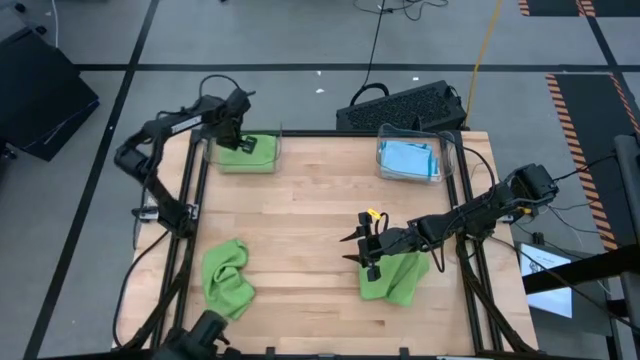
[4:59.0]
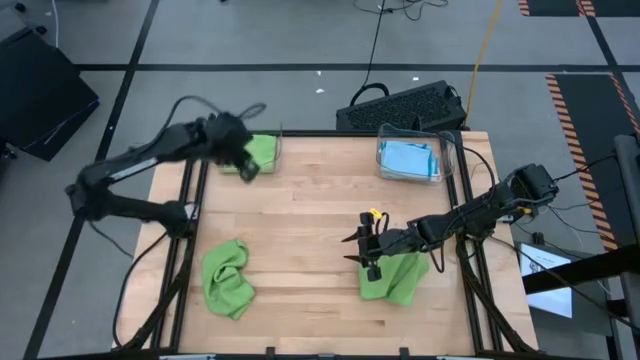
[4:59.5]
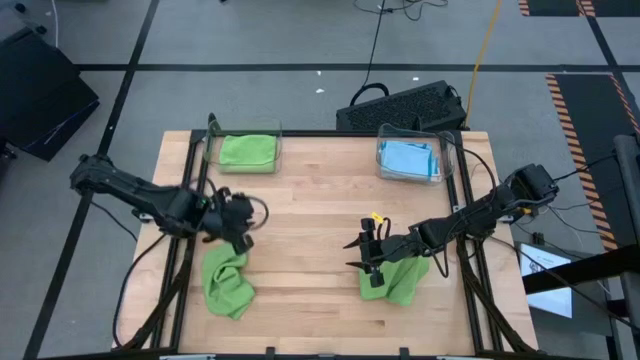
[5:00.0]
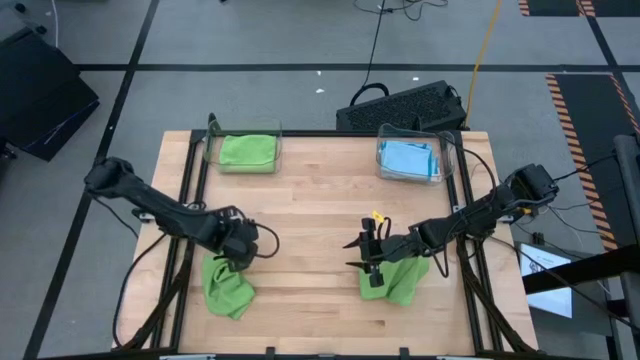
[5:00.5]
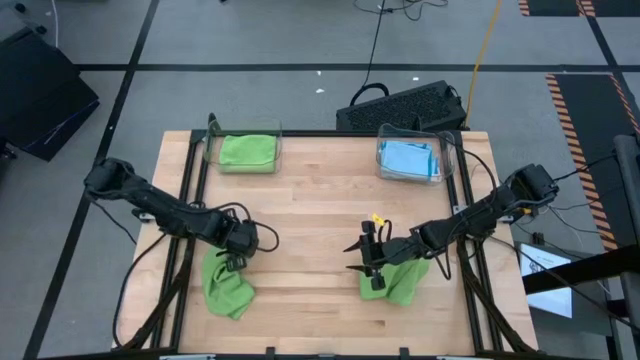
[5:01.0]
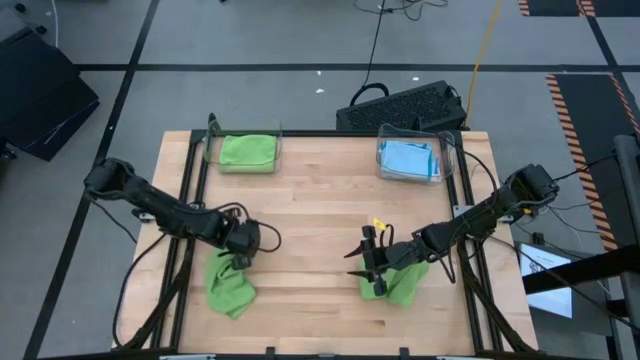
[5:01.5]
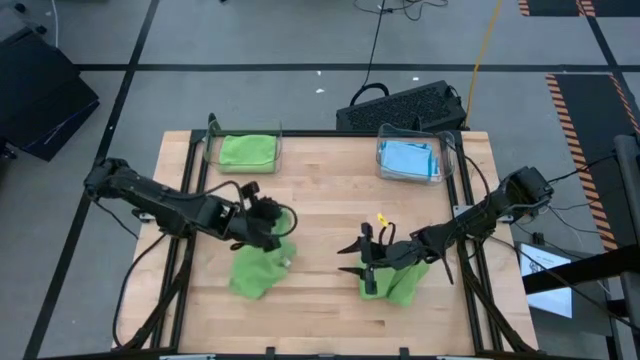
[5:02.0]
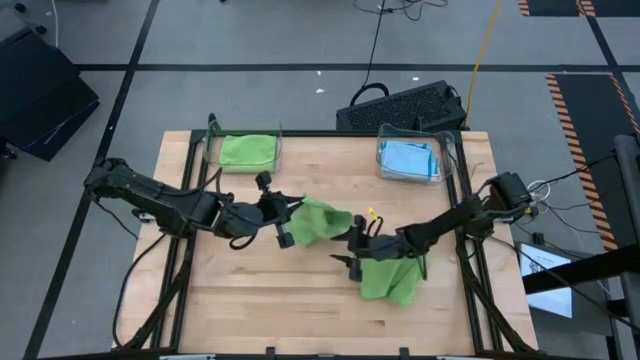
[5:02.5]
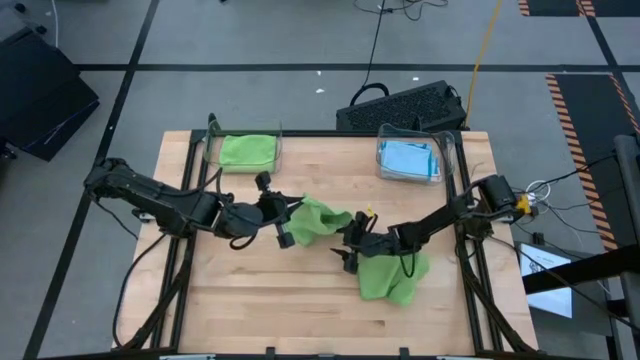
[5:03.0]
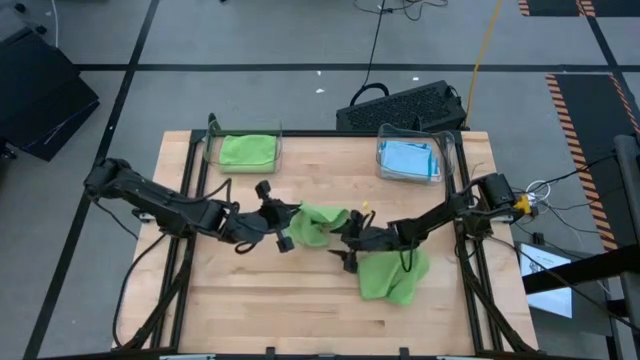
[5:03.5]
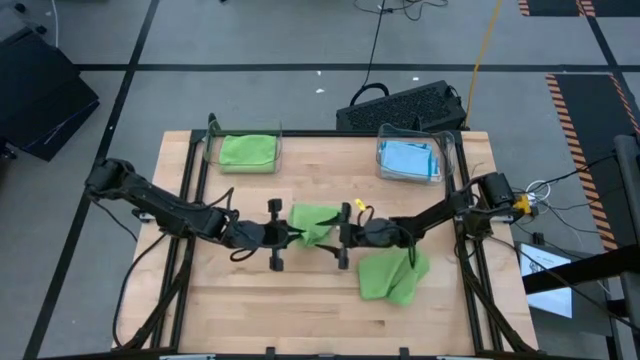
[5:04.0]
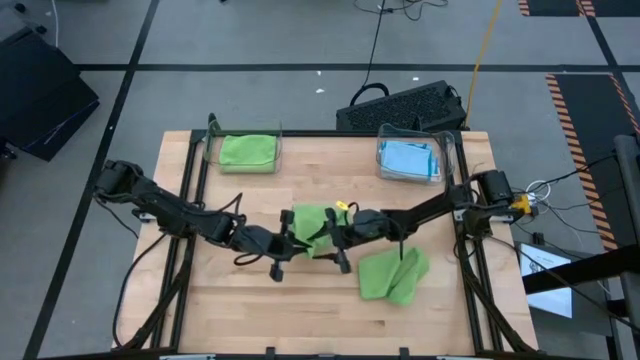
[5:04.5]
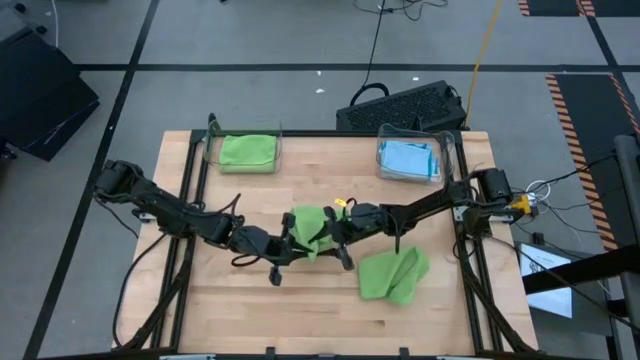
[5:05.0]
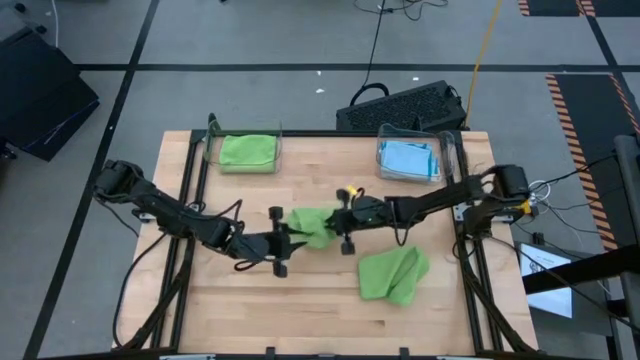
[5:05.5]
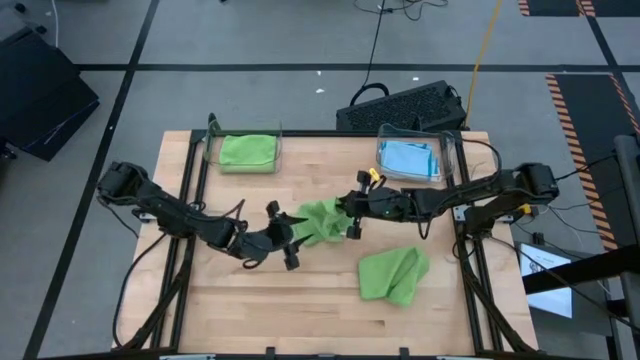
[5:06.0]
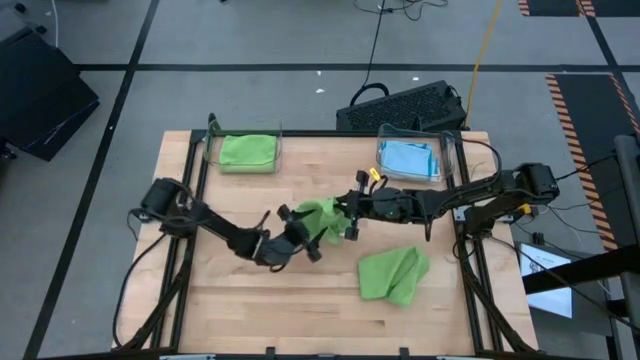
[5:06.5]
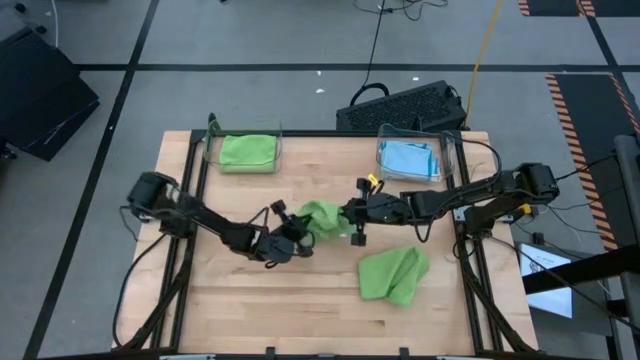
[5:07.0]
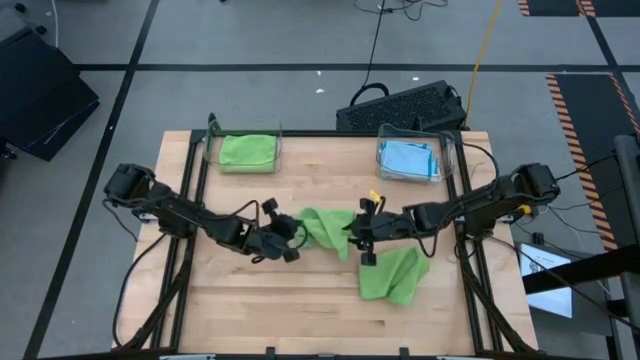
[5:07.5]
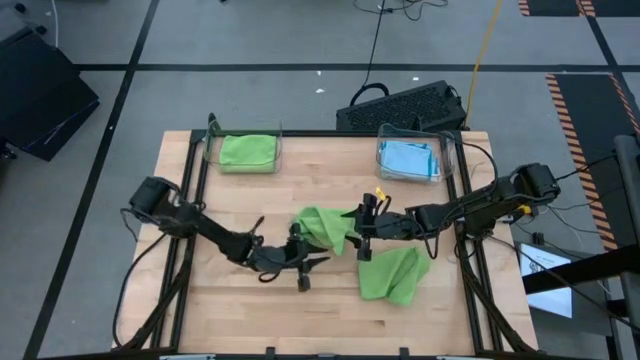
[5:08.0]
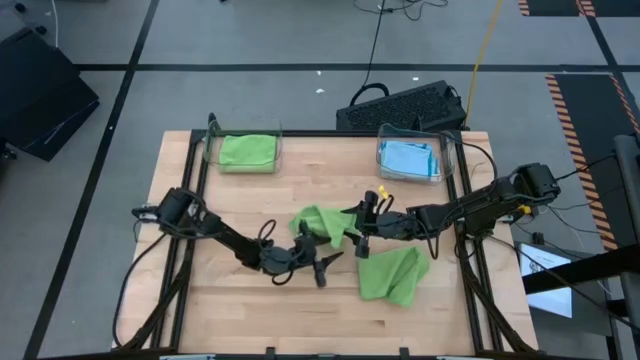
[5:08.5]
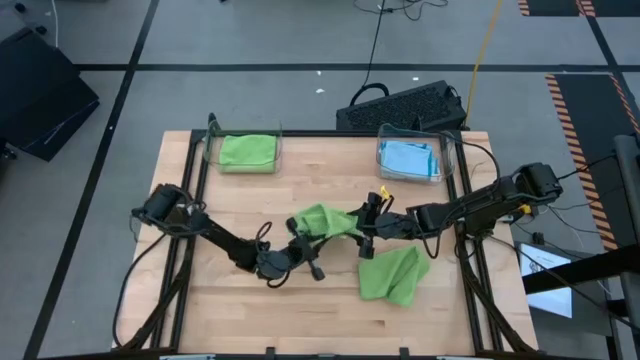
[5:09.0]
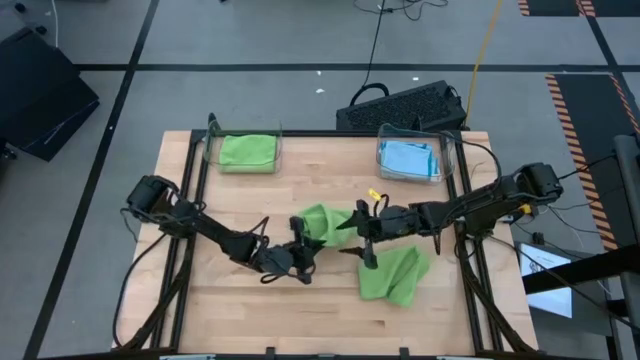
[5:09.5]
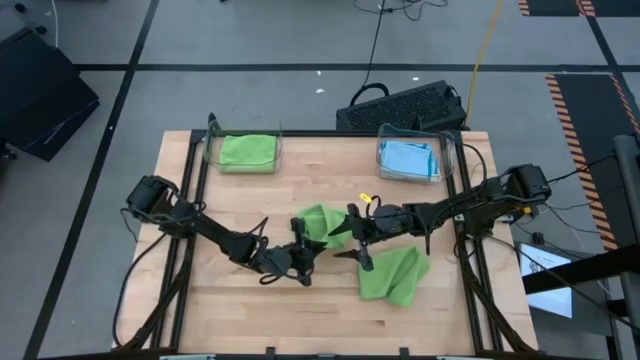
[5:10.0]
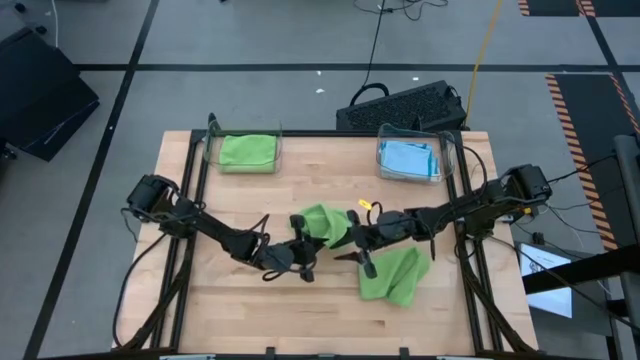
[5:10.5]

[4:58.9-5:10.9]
Task: Fold microfiber towels
Fold the left green microfiber cloth

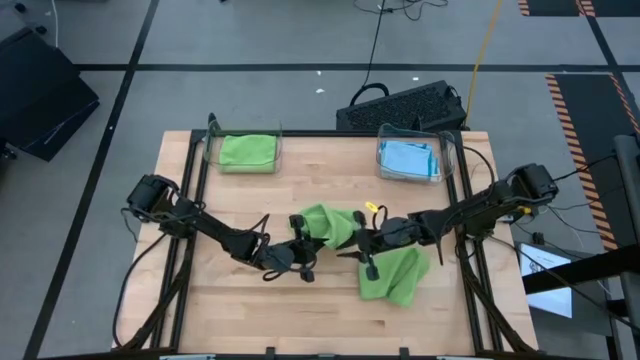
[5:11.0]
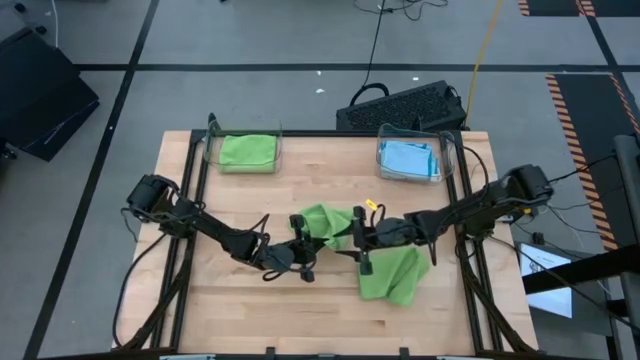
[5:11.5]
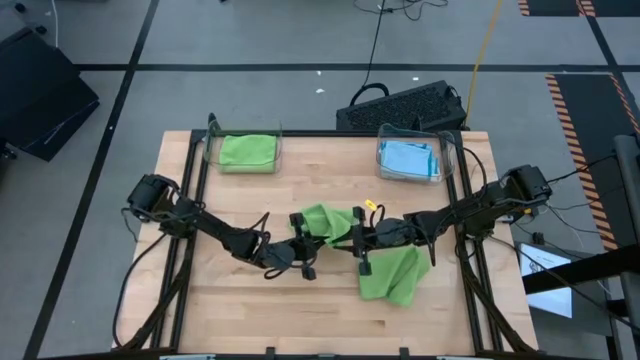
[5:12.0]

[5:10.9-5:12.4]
Fold the left green microfiber cloth

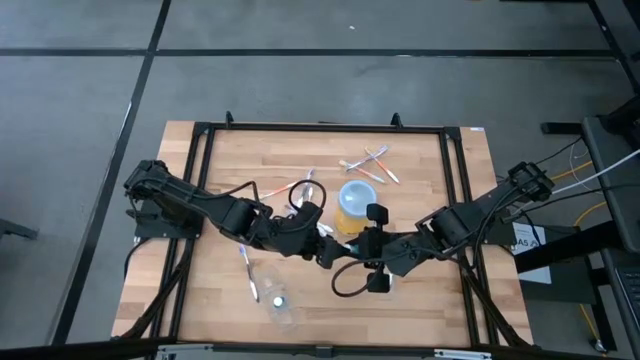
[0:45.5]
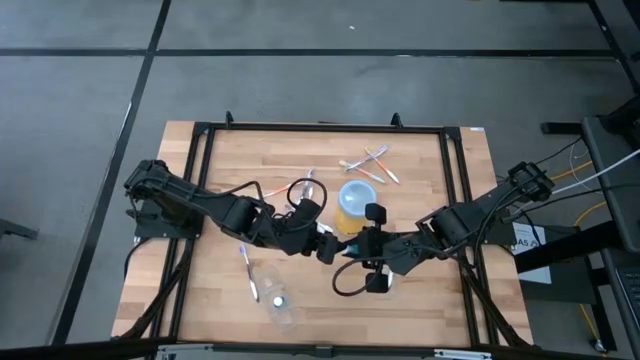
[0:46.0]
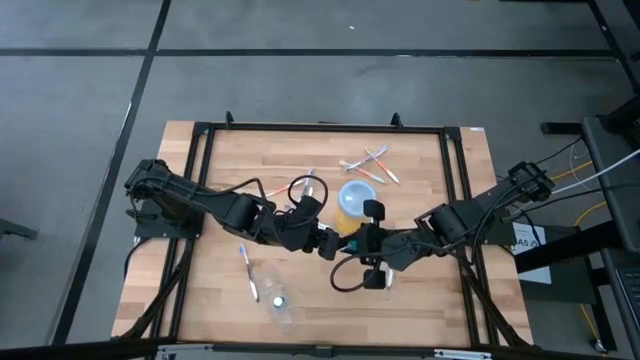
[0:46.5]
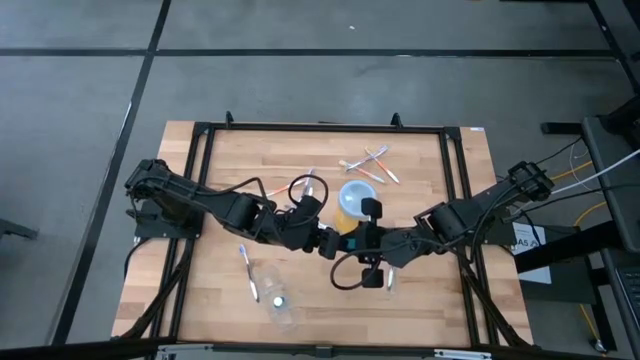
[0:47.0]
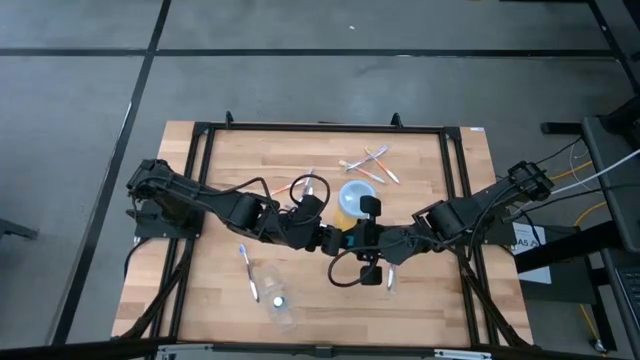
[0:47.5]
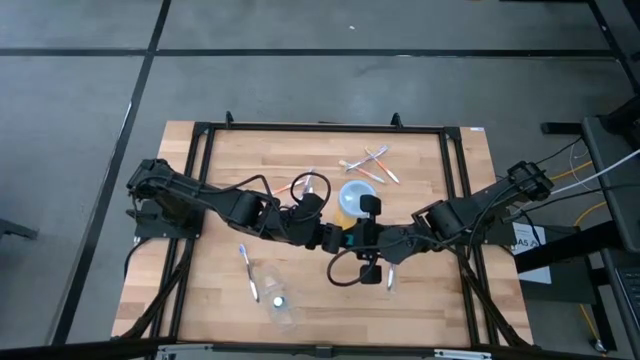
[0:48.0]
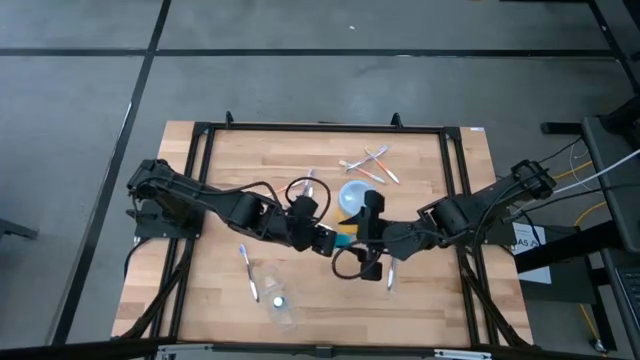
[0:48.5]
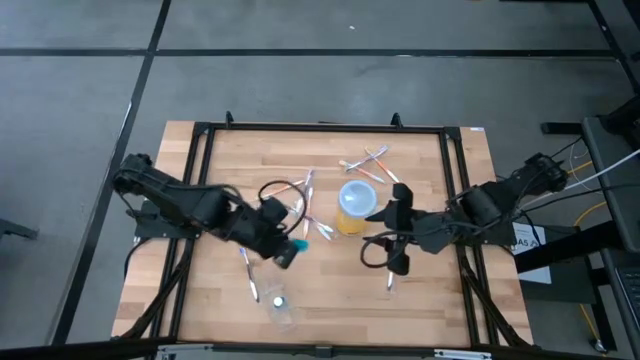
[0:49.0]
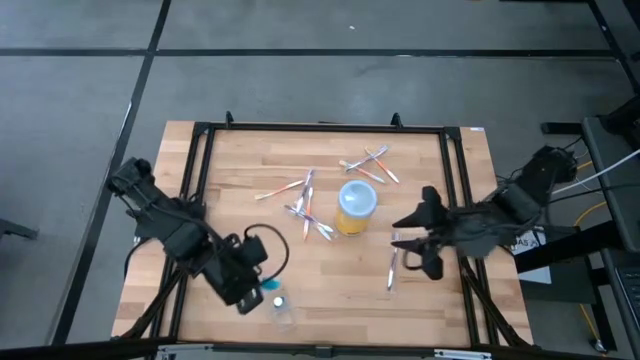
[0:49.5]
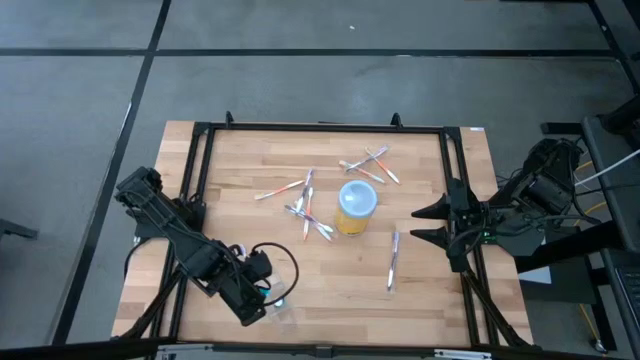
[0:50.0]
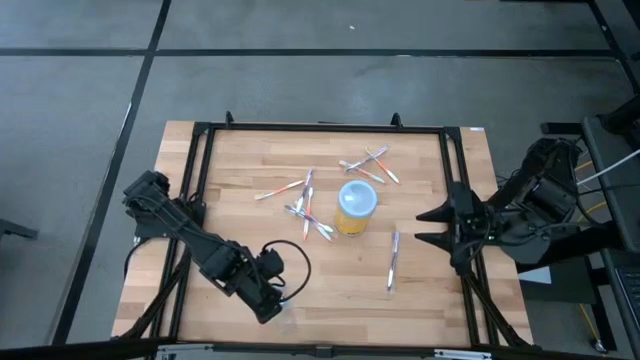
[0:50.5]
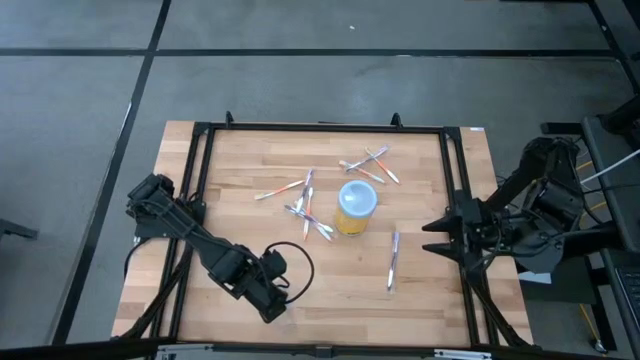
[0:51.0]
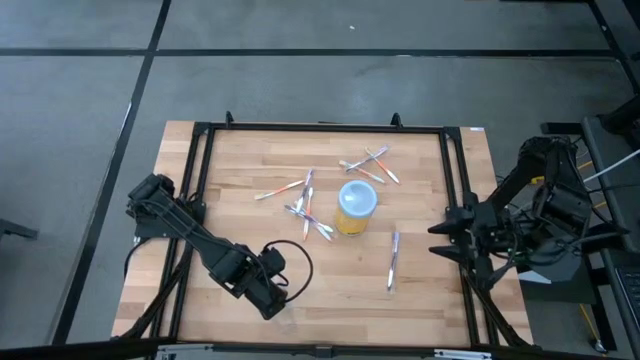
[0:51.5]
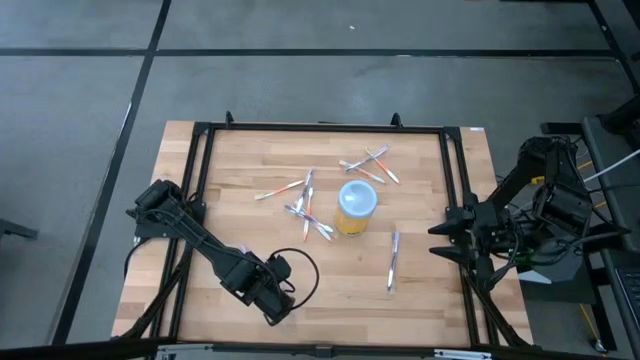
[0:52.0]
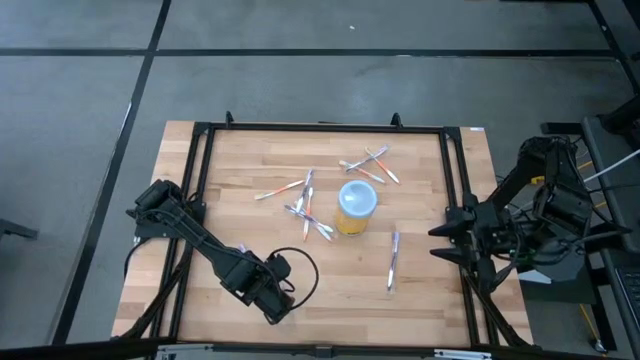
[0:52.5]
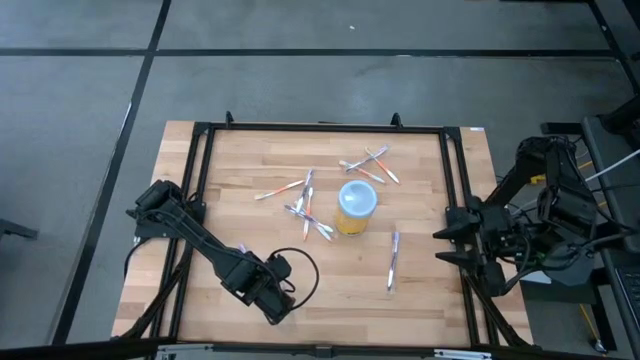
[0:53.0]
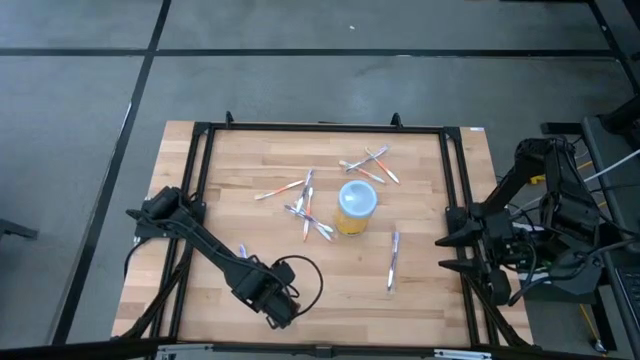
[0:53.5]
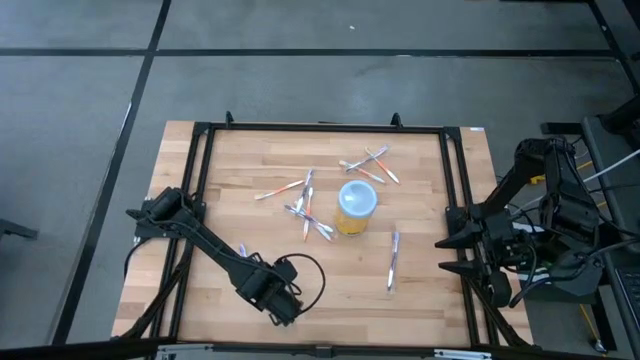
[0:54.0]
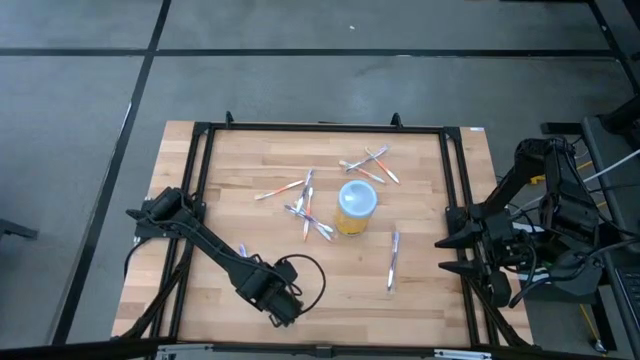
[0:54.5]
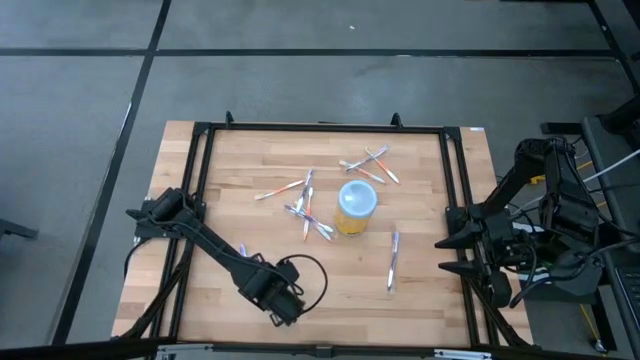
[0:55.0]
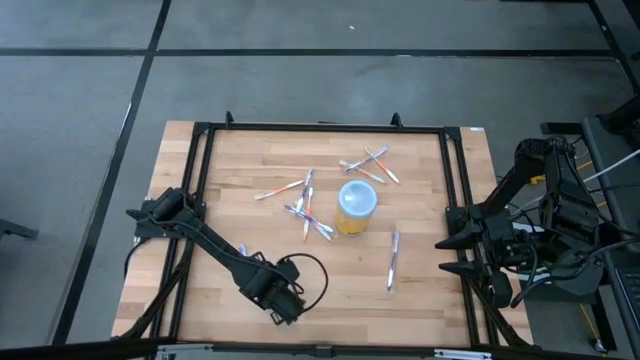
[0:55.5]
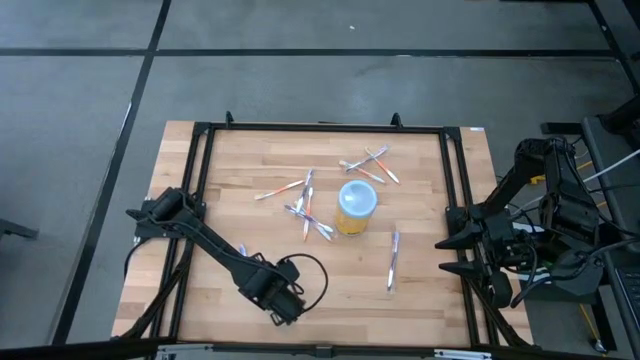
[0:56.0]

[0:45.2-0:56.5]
Task: Pick & Place toothbrushing station
Put the mouthwash bottle into the middle part of the transparent organizer
